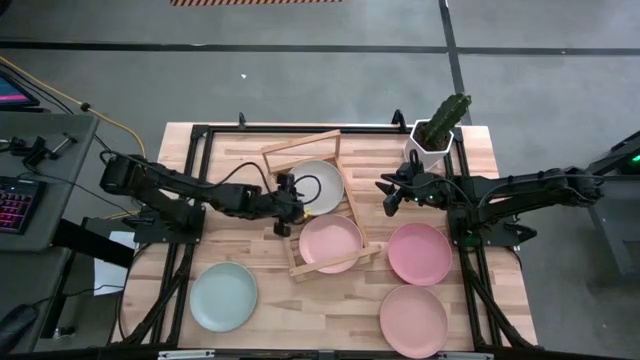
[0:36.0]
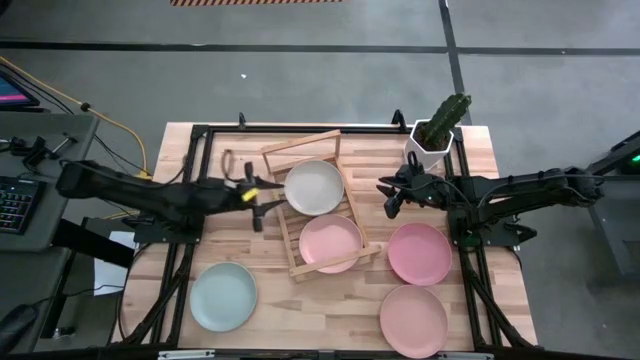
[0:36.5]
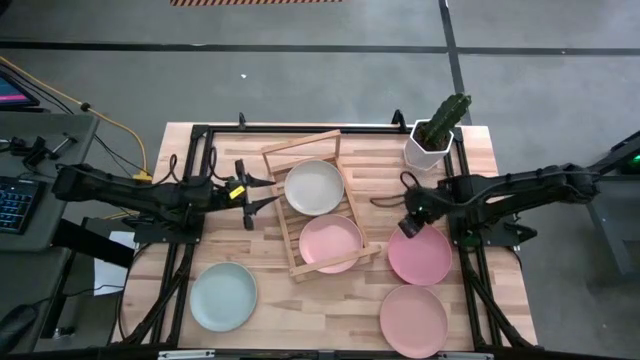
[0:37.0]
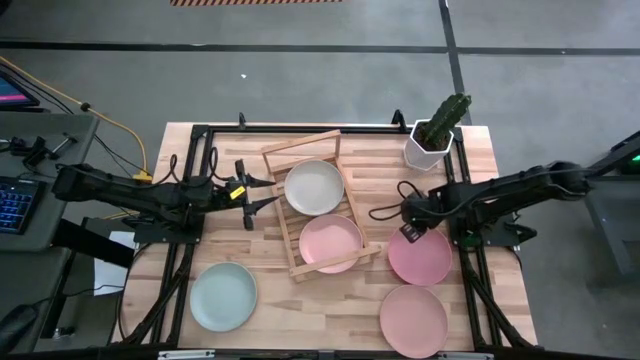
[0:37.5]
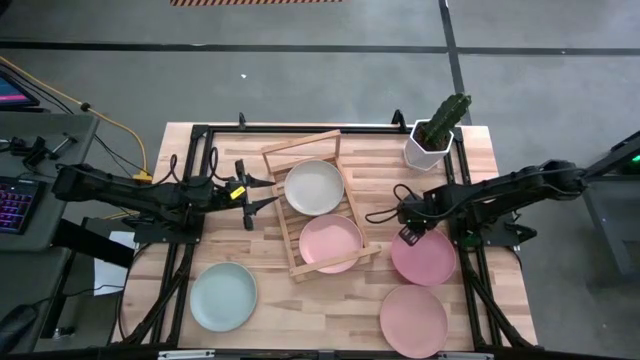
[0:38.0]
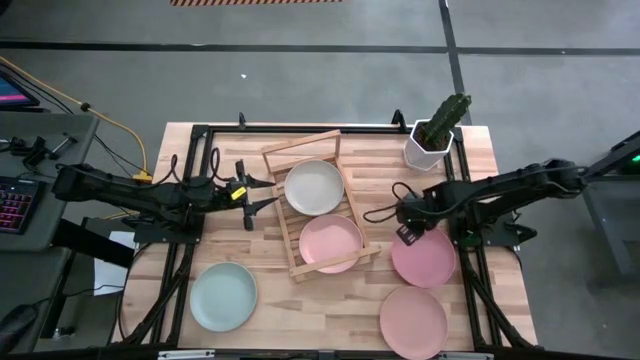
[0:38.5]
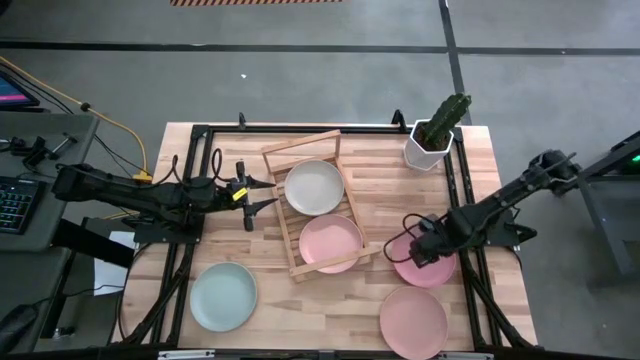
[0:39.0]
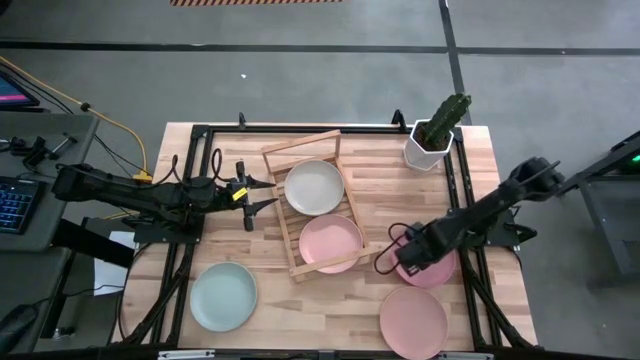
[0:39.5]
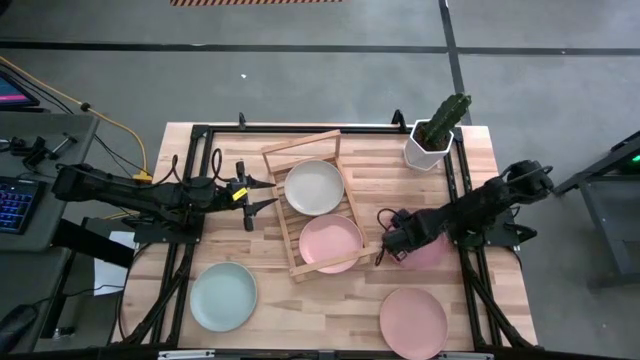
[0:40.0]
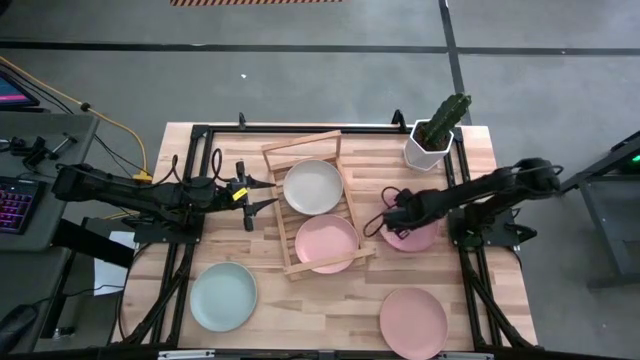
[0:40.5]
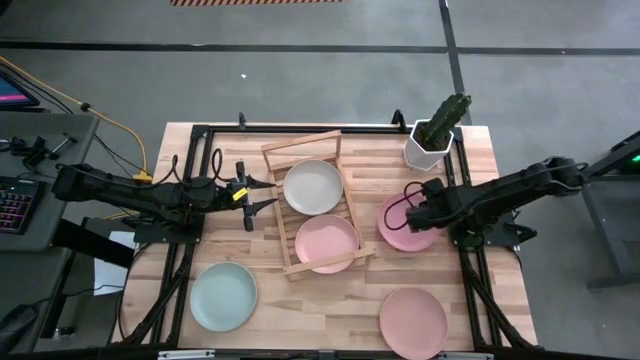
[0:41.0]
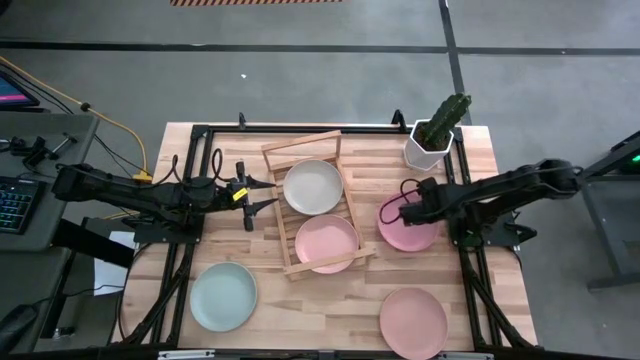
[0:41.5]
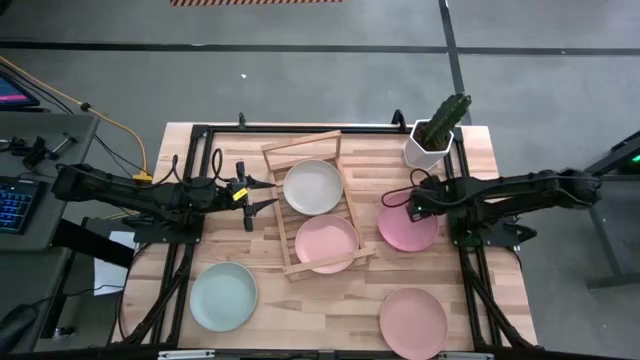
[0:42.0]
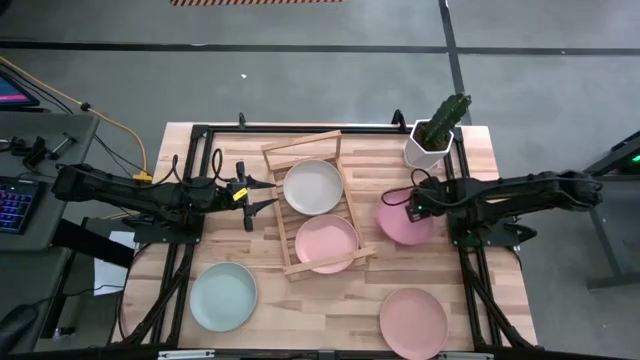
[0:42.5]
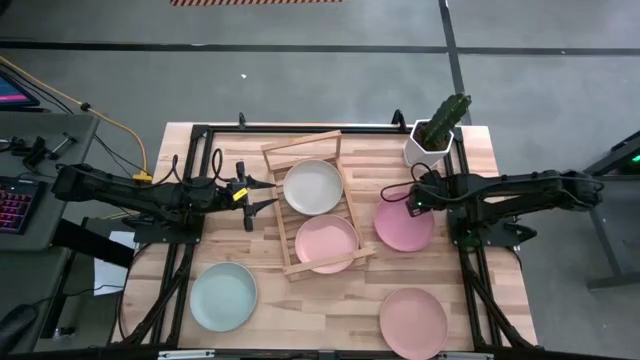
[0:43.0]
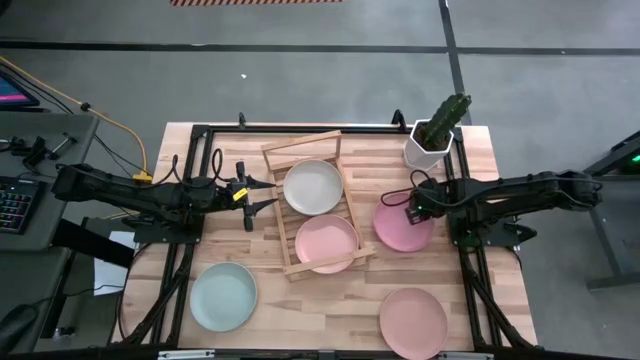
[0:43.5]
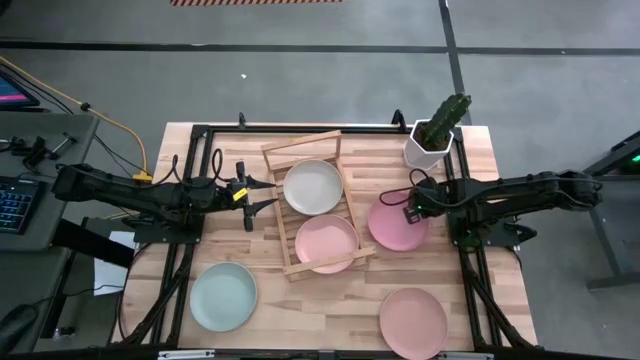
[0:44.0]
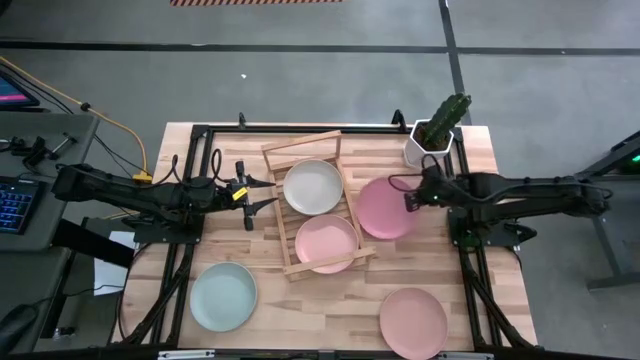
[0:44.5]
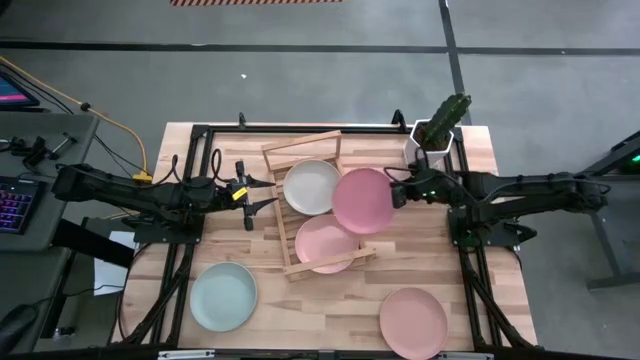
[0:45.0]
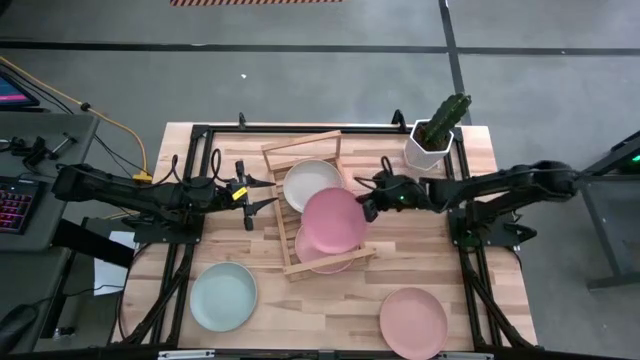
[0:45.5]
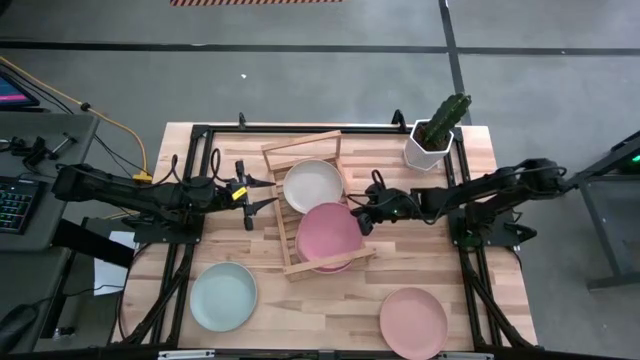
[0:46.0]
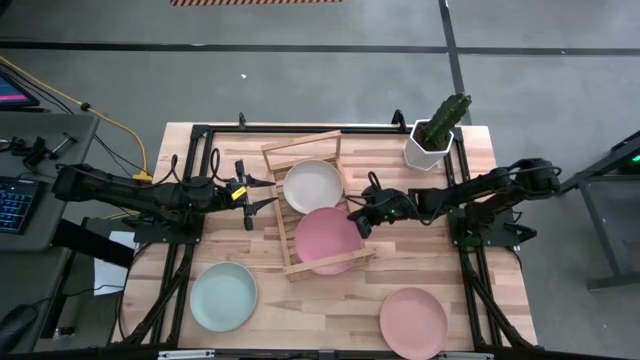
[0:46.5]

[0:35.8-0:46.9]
Task: Place and stack plates onto a shelf
Stack the top pink plate on top of the pink plate on the shelf

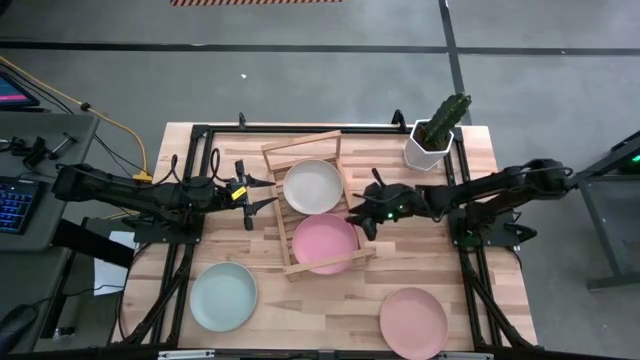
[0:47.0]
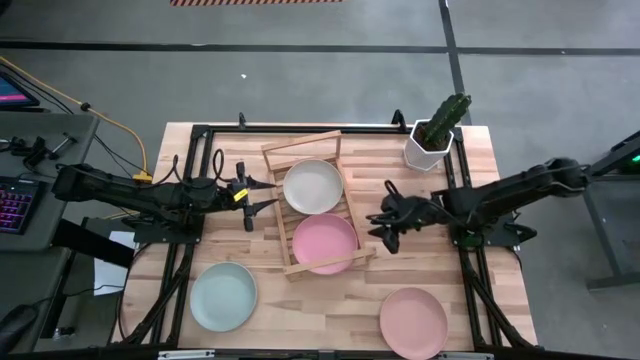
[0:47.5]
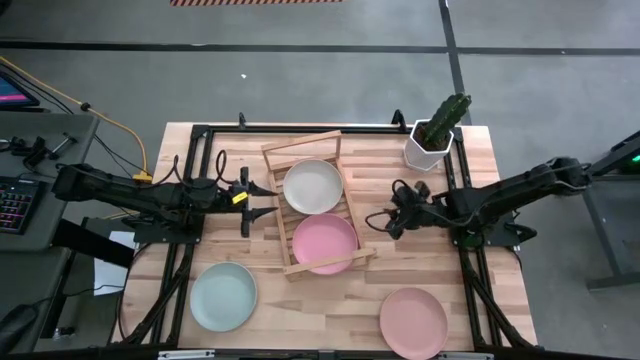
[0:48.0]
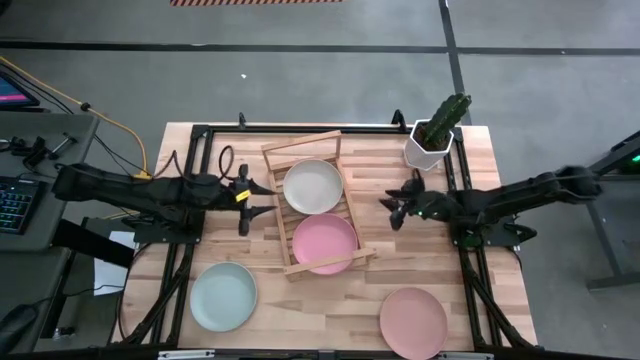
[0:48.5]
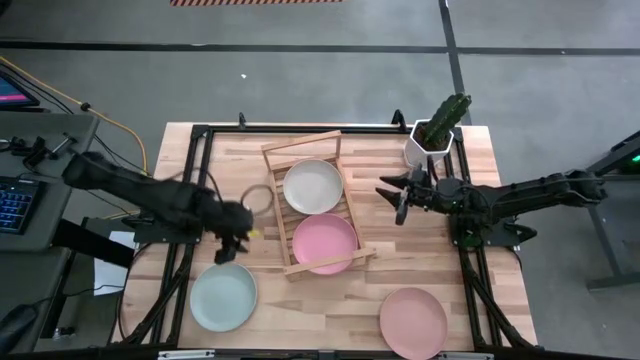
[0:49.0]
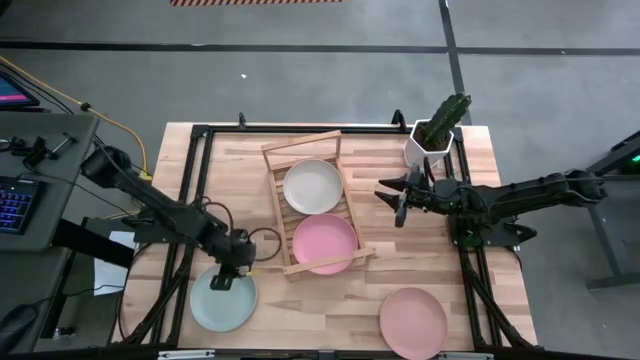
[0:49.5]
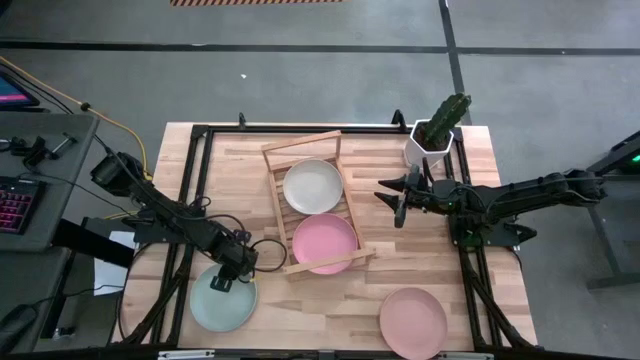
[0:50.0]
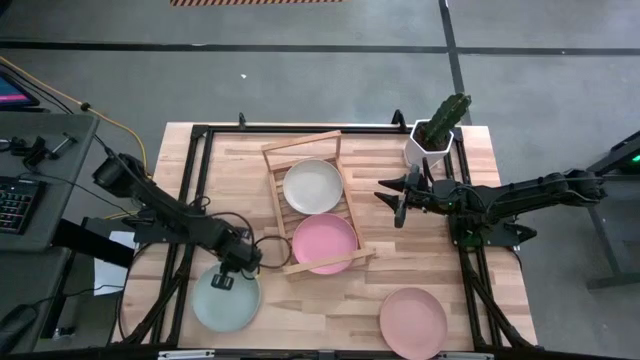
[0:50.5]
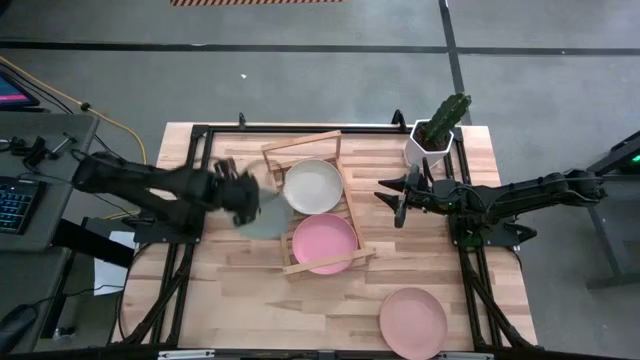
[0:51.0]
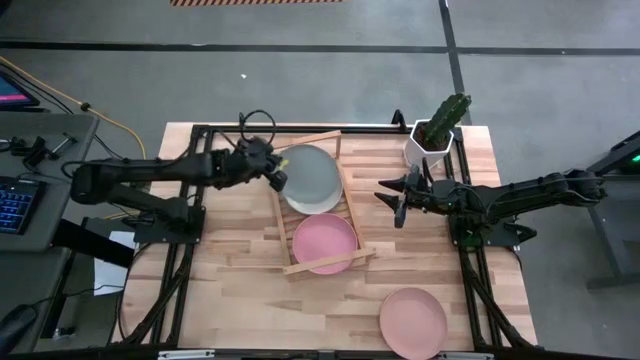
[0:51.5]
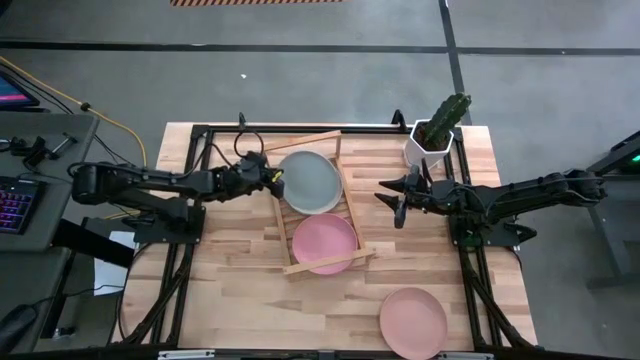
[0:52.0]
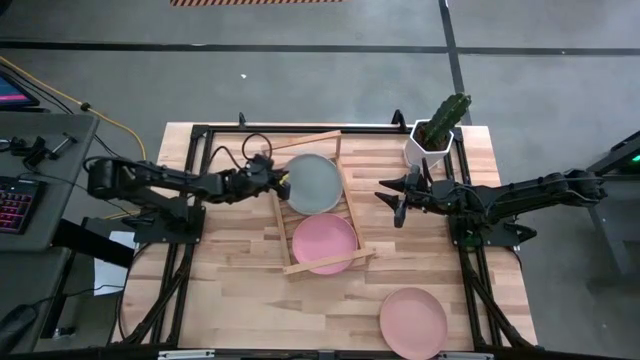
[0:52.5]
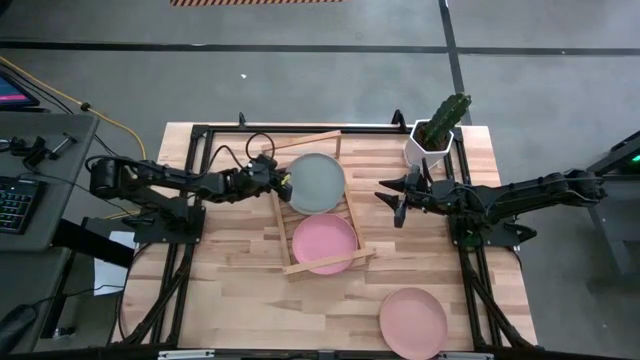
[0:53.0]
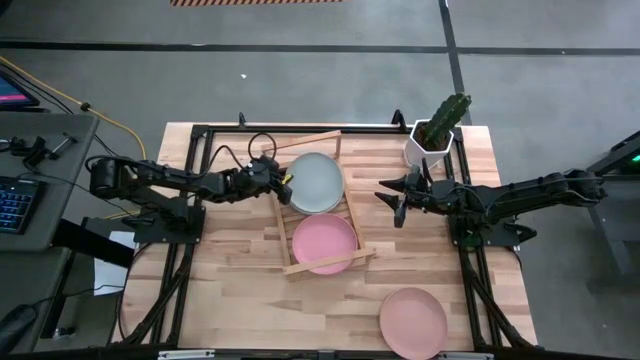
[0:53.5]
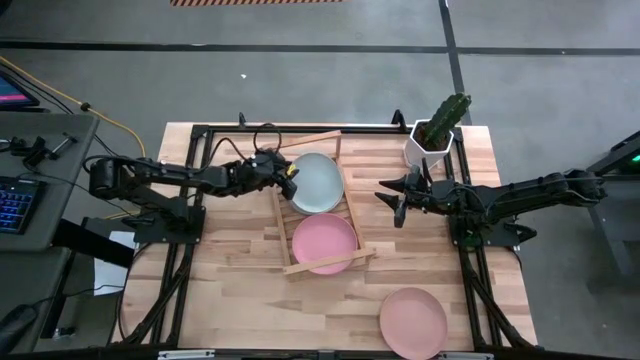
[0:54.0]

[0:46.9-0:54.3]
Stack the blue plate on top of the gray plate on the shelf

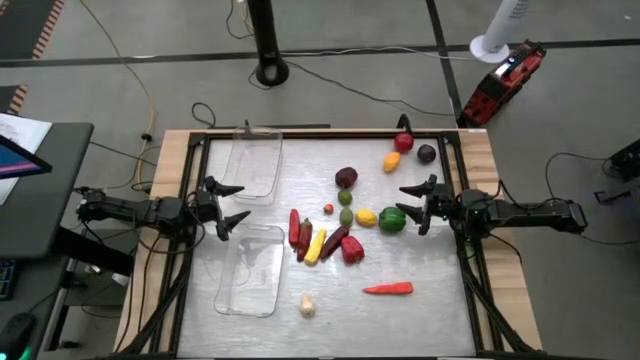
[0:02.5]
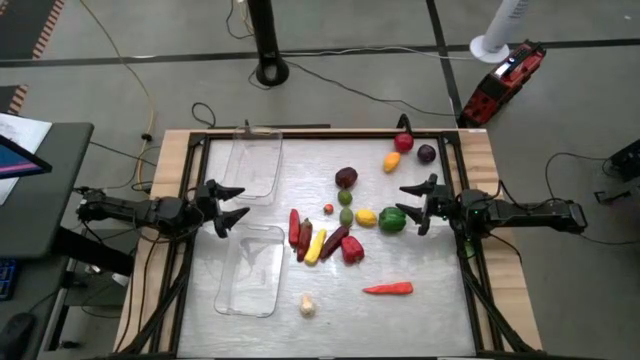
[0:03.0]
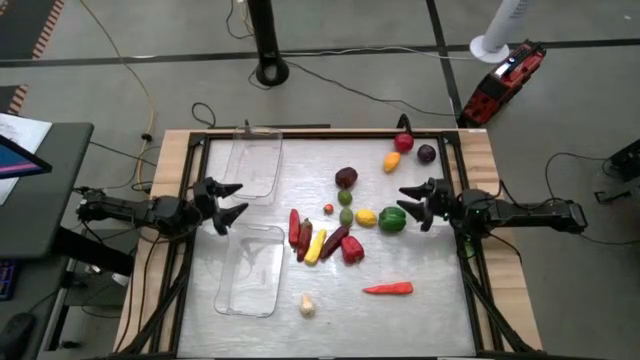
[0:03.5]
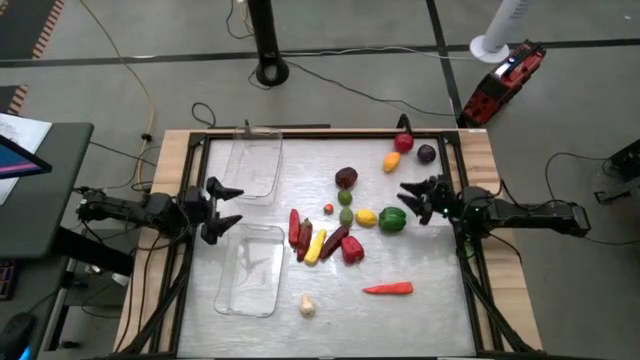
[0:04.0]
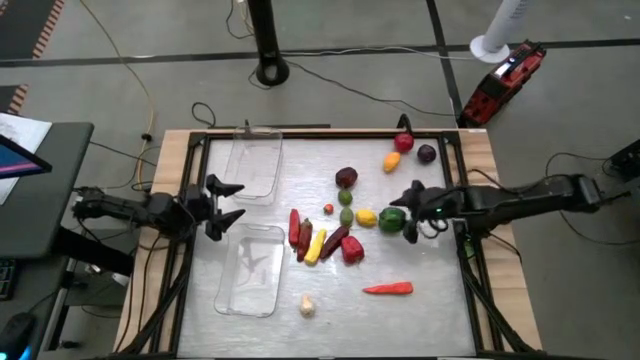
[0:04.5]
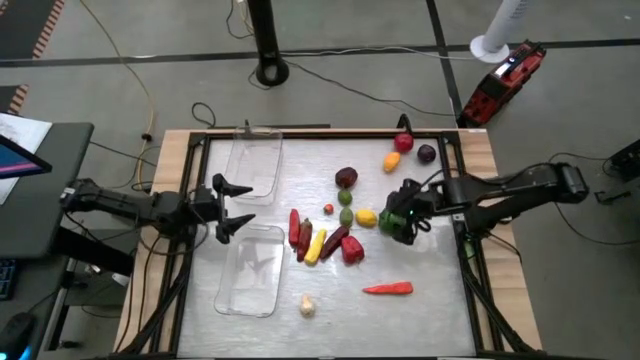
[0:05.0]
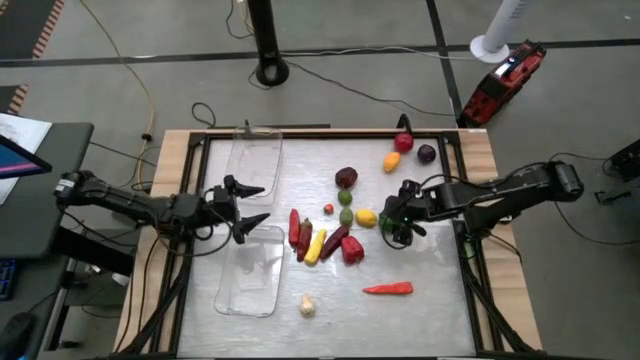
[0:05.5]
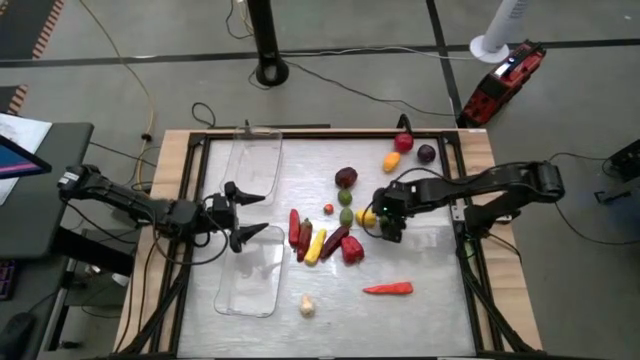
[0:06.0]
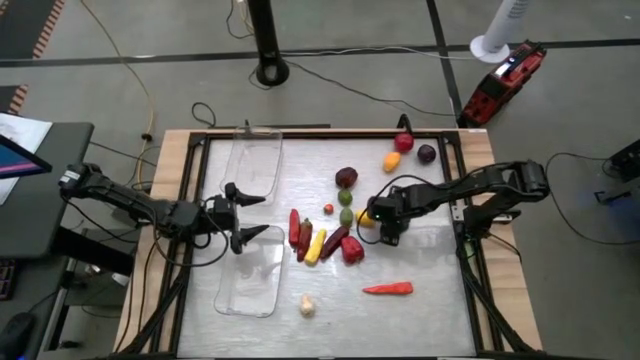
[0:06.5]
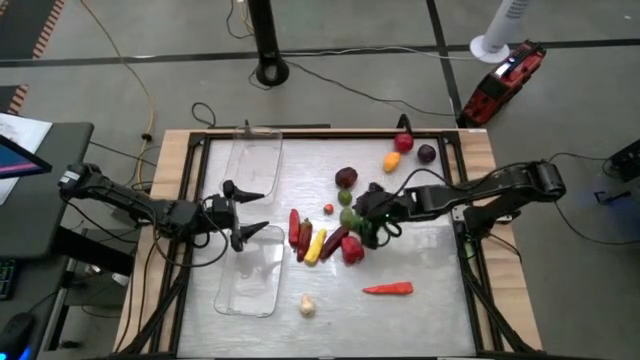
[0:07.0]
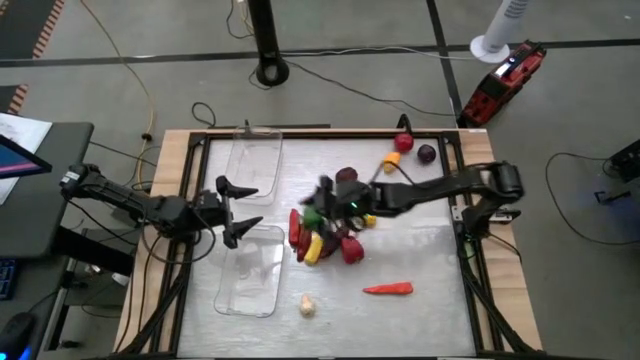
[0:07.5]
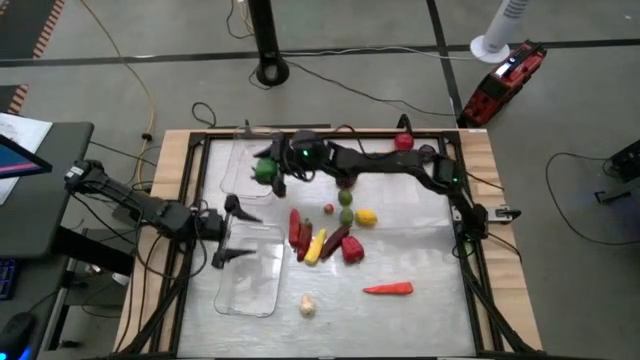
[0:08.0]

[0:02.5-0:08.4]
Task: Sort produce into baskets
Put the green bell pepper into the top transparent bin
